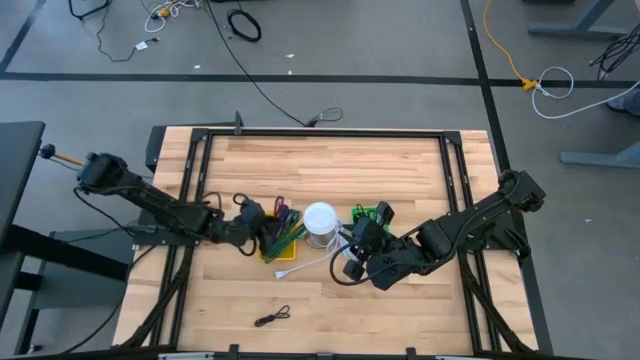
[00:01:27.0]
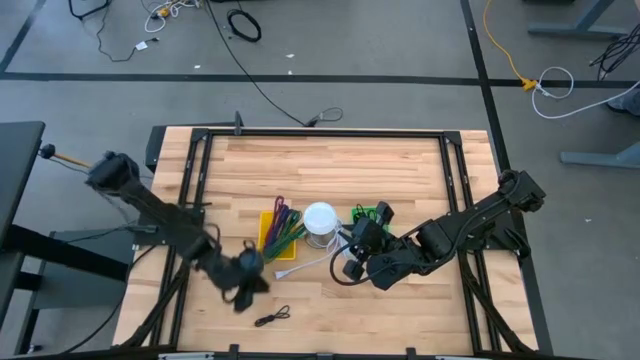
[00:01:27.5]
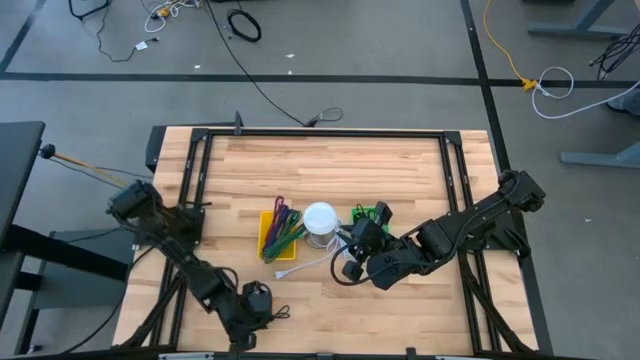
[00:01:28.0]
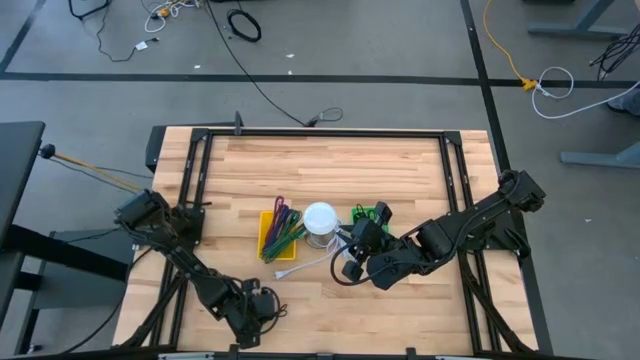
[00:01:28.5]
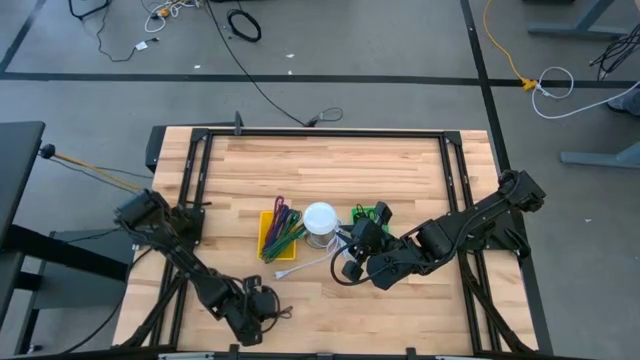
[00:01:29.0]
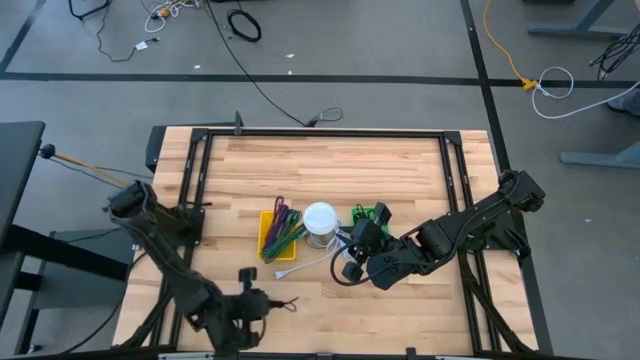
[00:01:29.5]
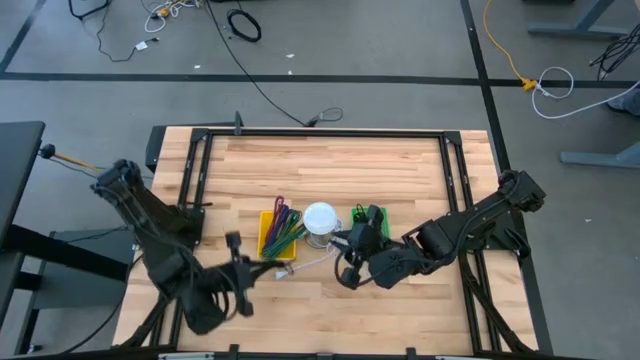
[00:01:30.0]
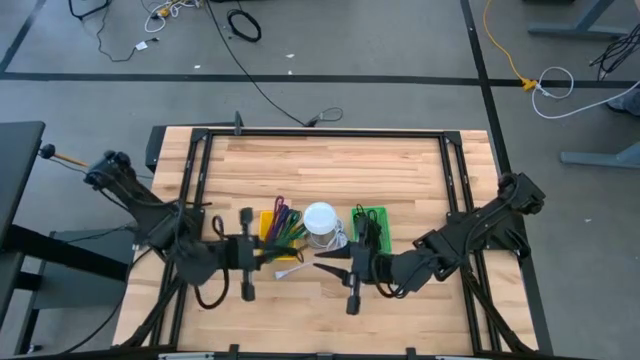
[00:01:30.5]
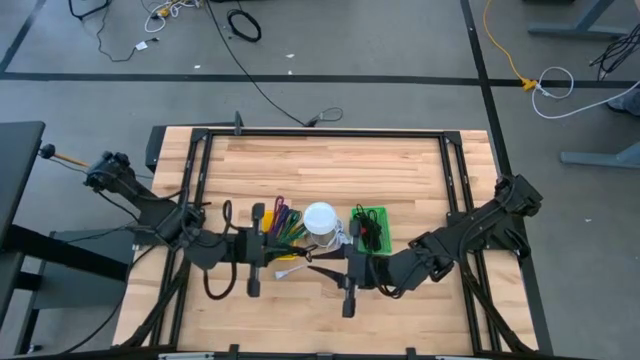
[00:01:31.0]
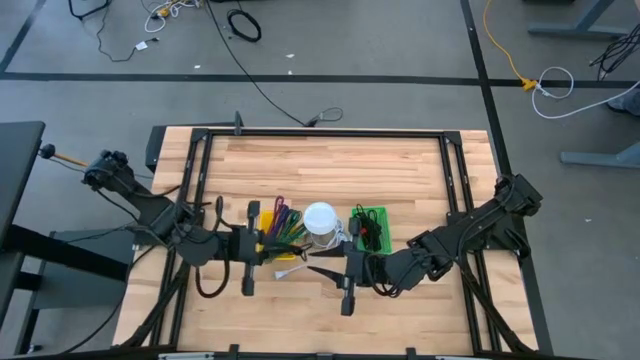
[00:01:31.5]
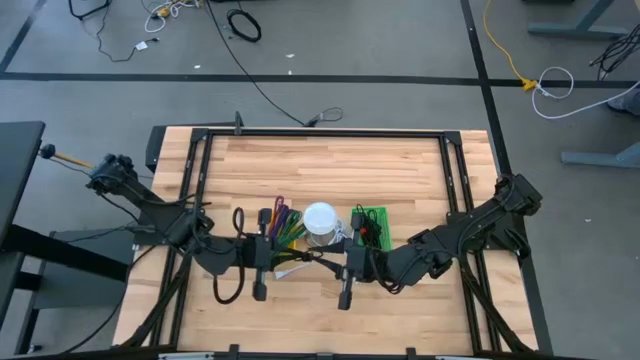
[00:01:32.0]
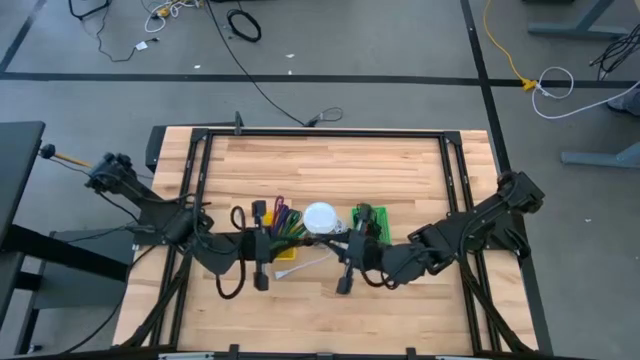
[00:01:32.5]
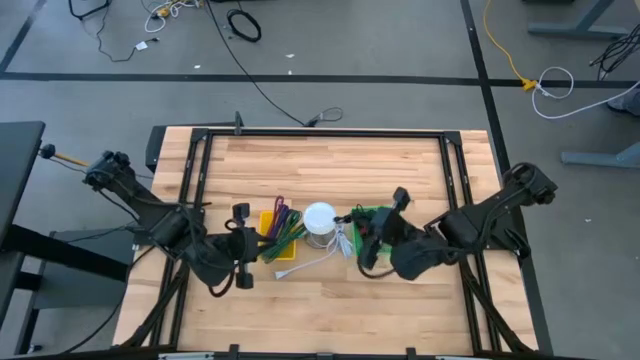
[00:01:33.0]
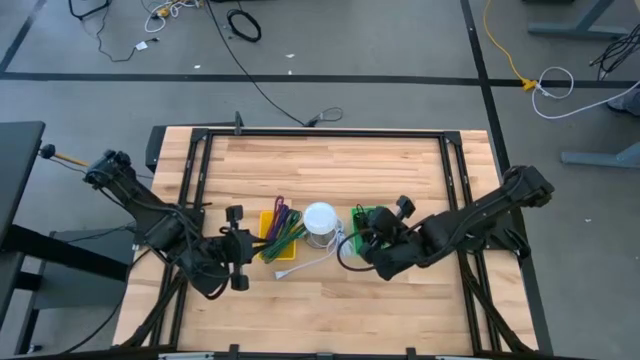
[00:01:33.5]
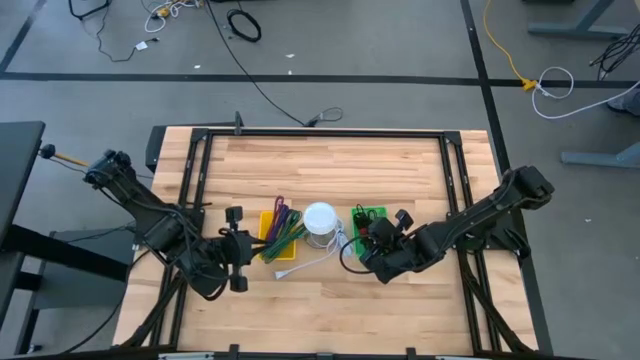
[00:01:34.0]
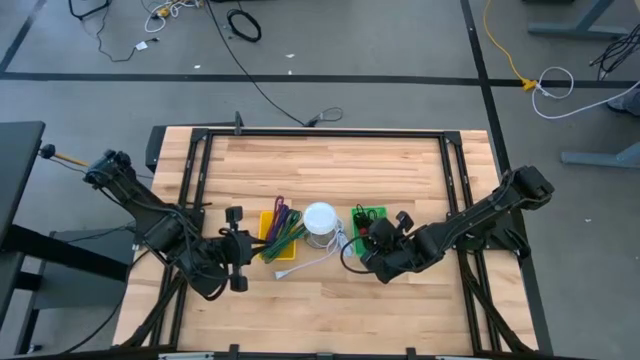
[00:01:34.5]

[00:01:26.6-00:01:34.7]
Task: Pick & Place USB Port
Put the black charger cable into the green basket

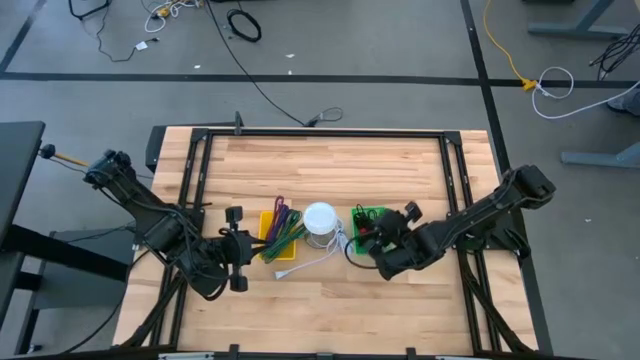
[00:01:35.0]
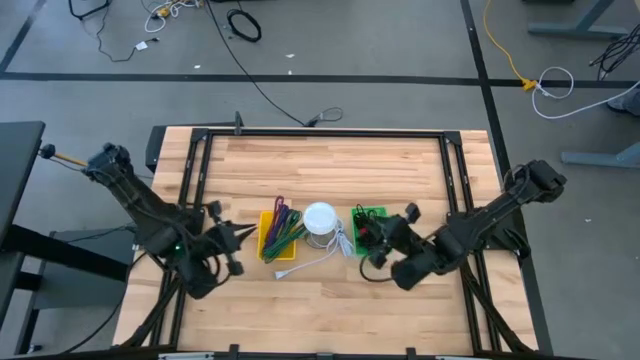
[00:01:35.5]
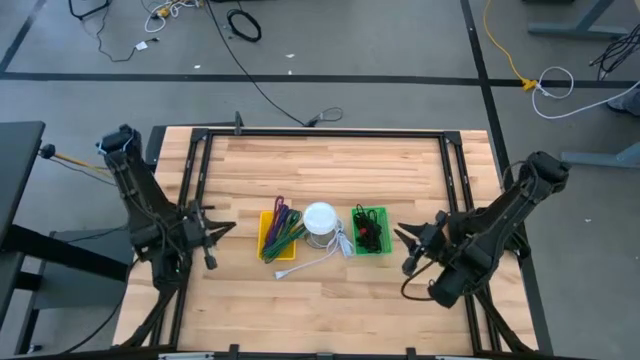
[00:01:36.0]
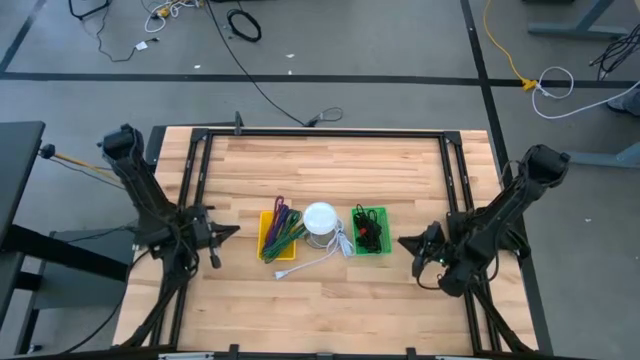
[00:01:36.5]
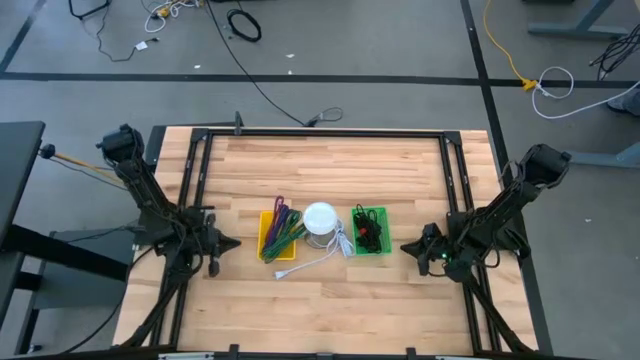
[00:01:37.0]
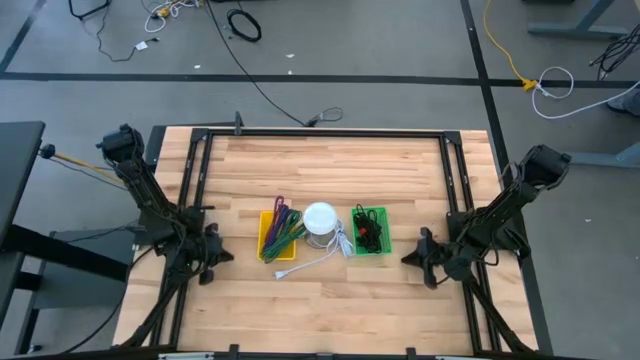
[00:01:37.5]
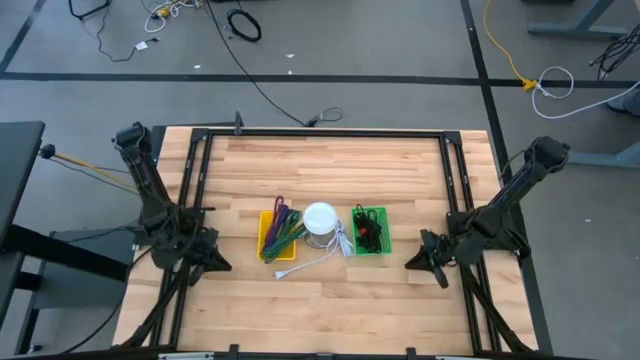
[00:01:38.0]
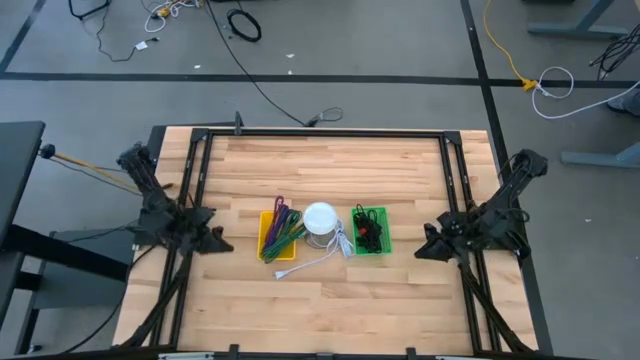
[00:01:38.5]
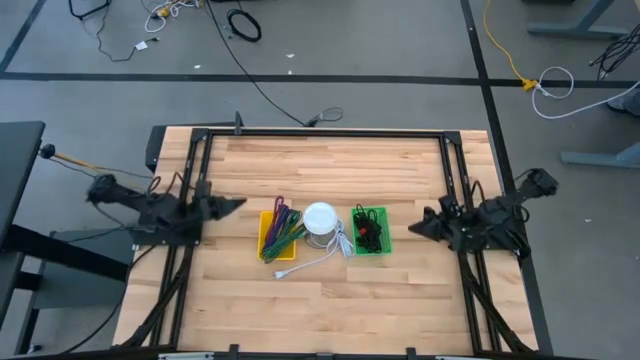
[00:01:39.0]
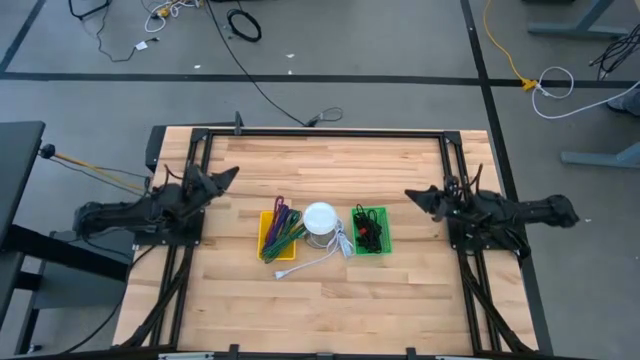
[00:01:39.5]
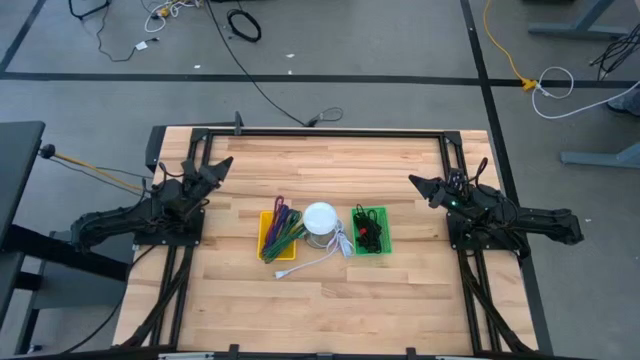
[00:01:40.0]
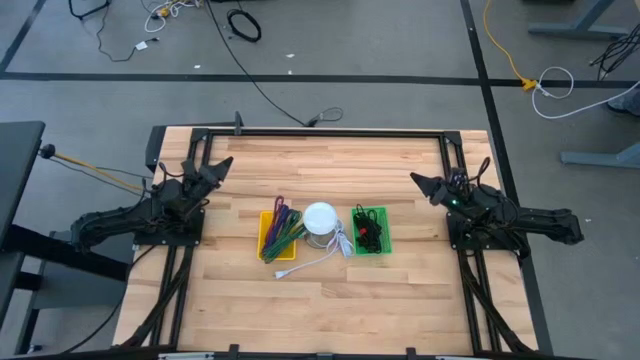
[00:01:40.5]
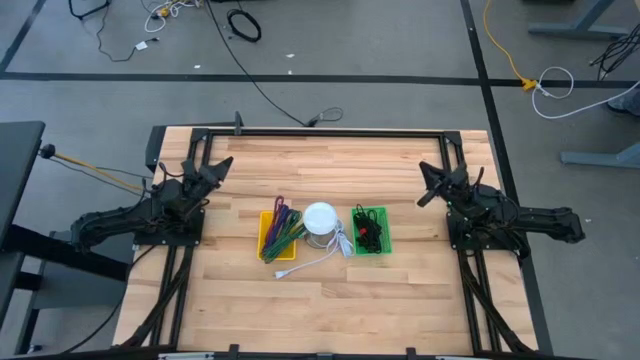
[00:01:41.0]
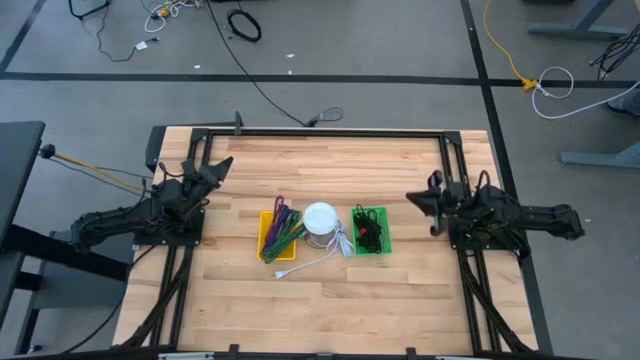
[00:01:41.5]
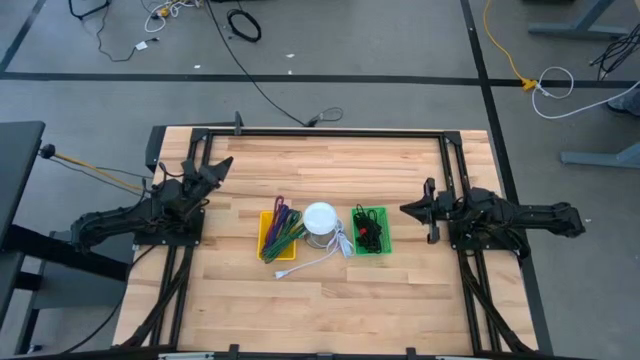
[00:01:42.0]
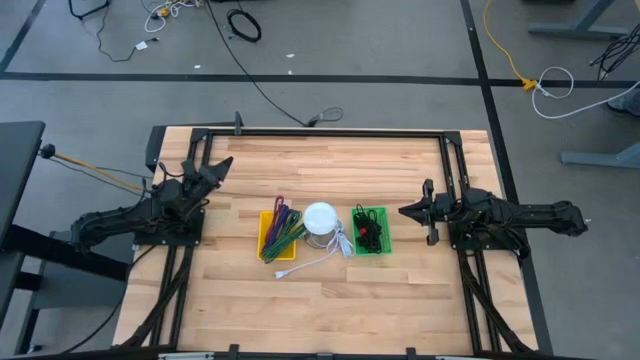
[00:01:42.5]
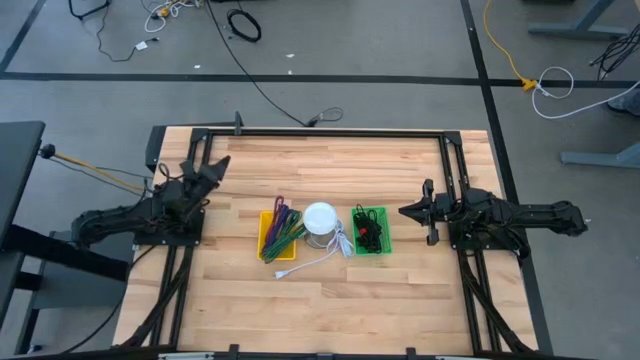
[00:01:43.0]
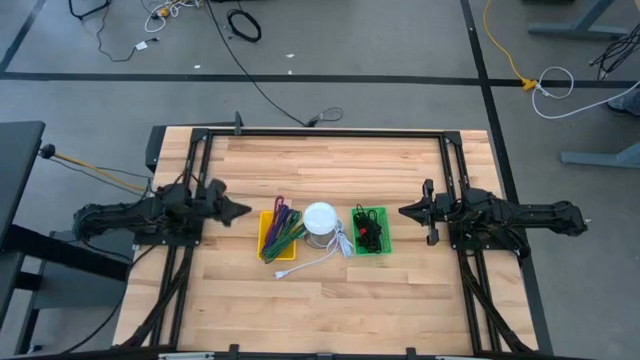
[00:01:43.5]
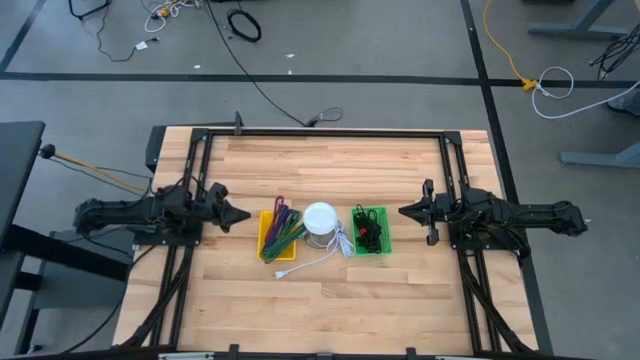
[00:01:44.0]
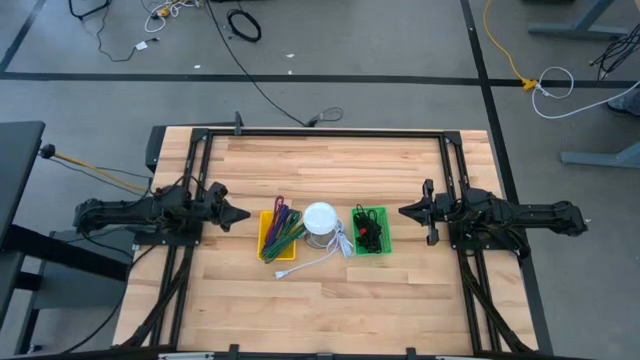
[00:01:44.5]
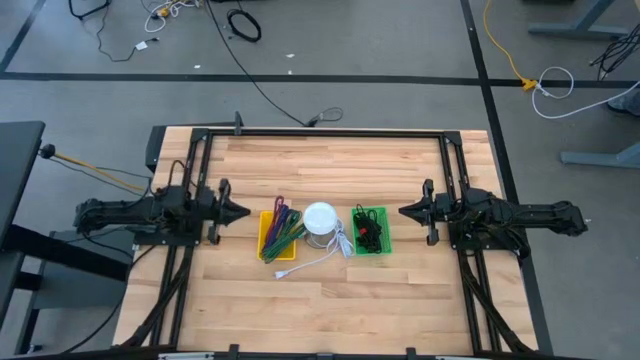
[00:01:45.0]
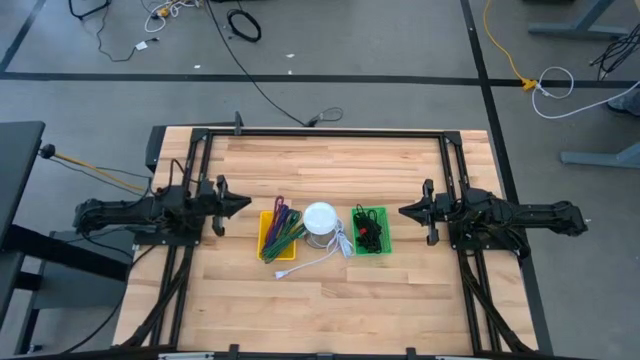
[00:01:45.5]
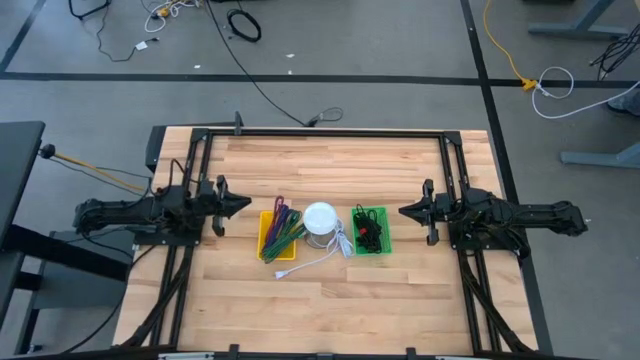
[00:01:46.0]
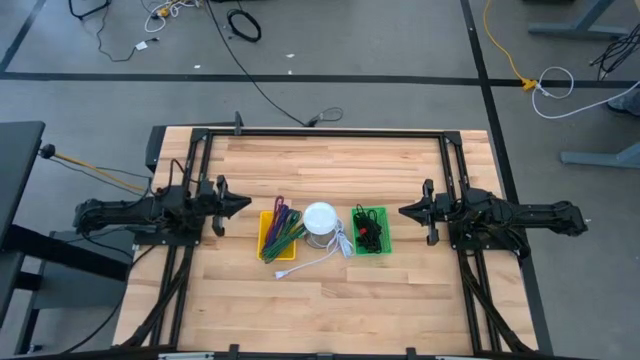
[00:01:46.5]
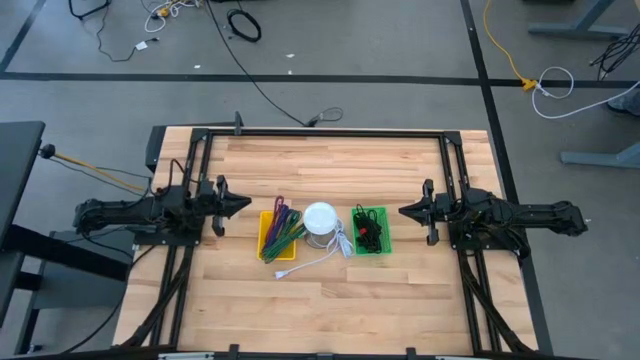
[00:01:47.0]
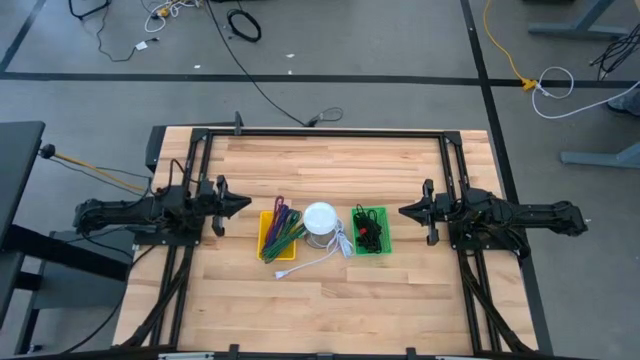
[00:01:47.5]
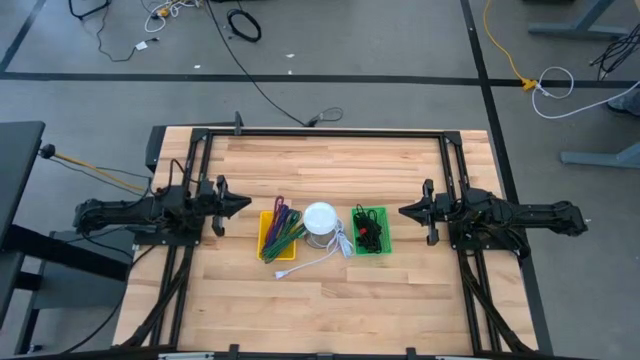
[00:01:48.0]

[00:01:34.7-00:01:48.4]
Return to Home Position
